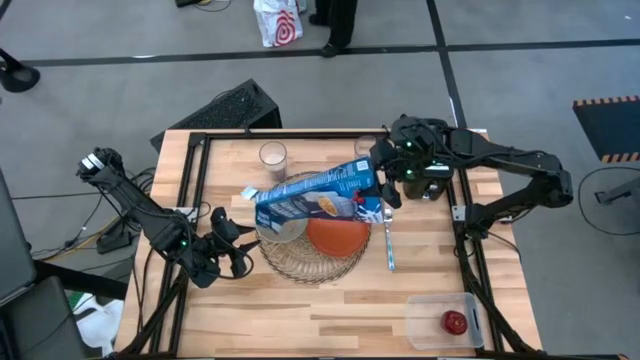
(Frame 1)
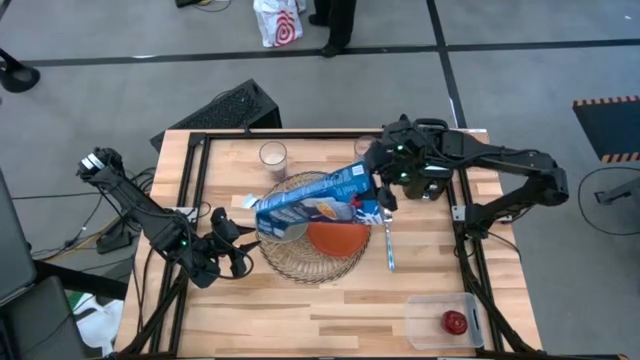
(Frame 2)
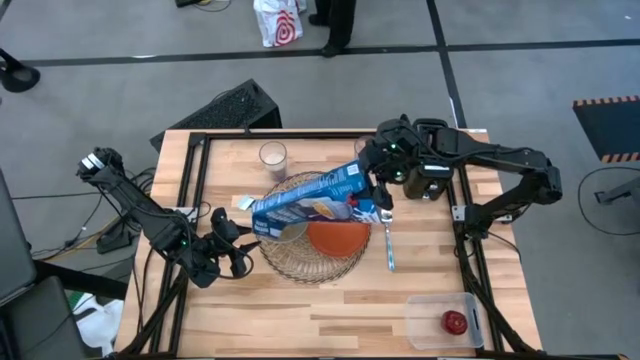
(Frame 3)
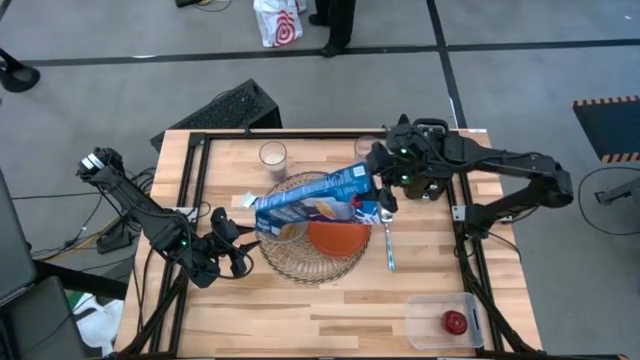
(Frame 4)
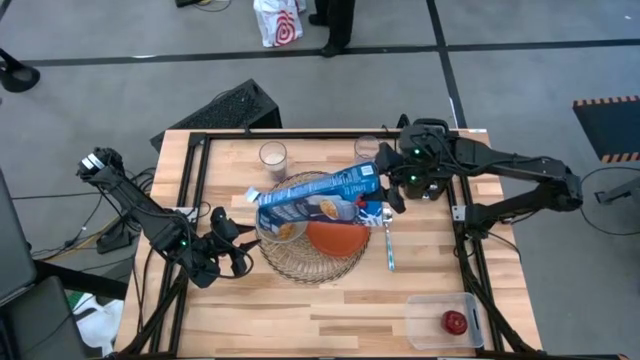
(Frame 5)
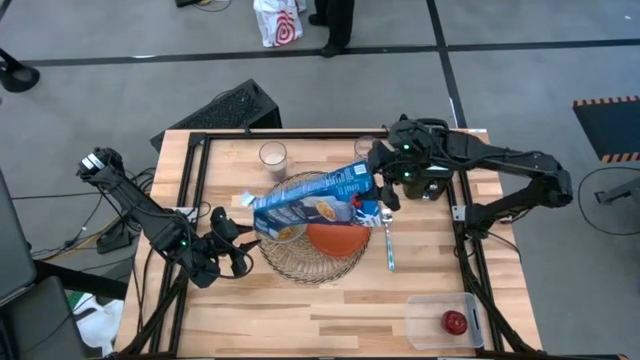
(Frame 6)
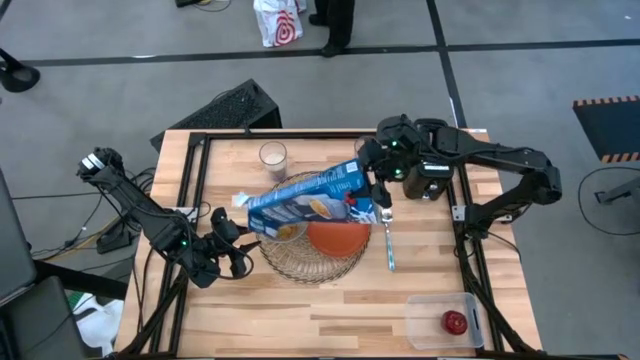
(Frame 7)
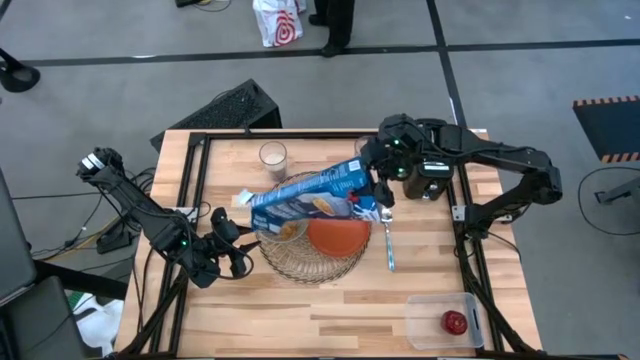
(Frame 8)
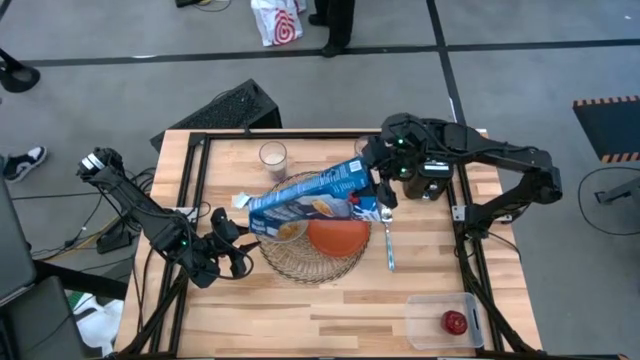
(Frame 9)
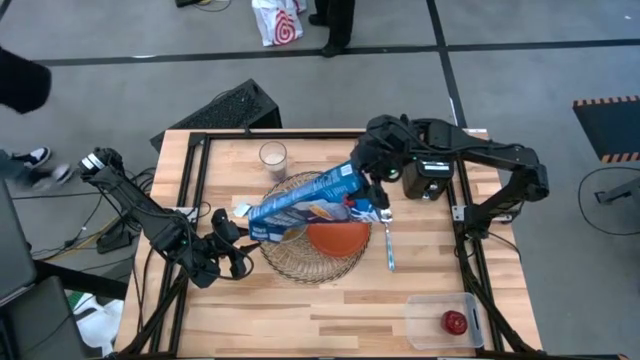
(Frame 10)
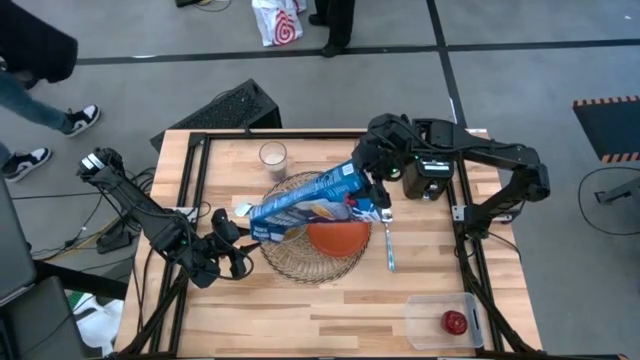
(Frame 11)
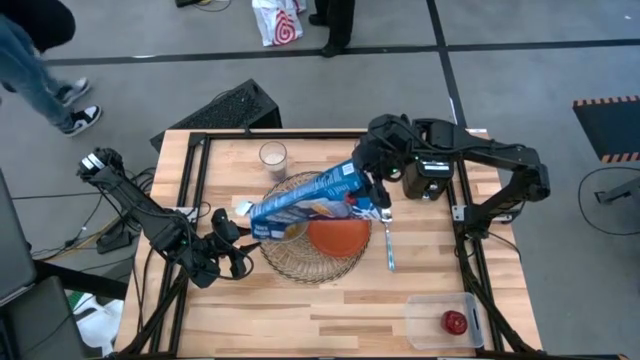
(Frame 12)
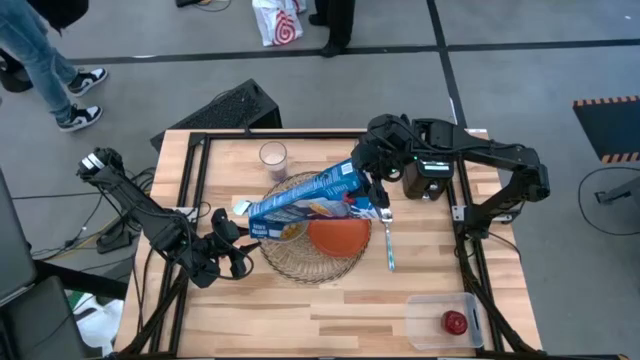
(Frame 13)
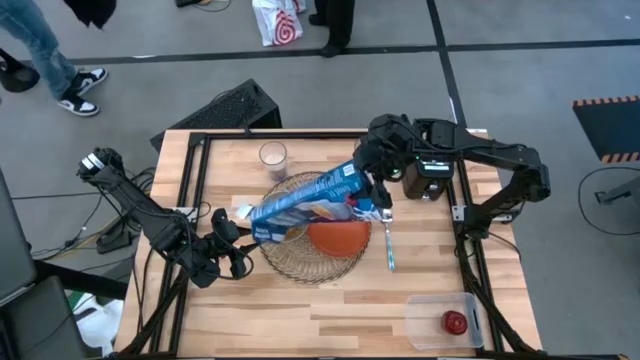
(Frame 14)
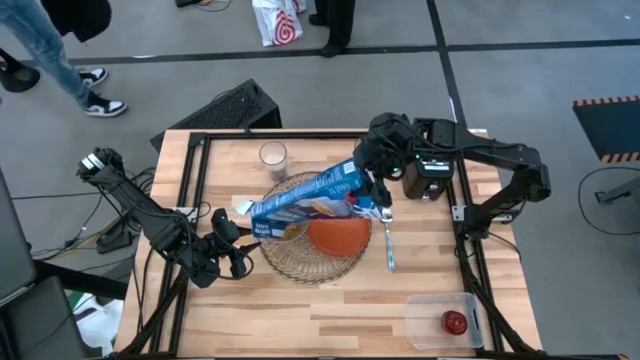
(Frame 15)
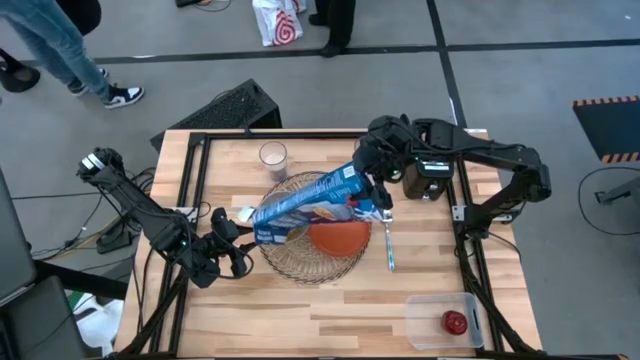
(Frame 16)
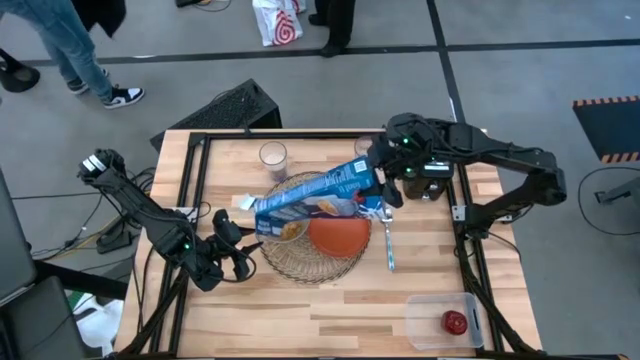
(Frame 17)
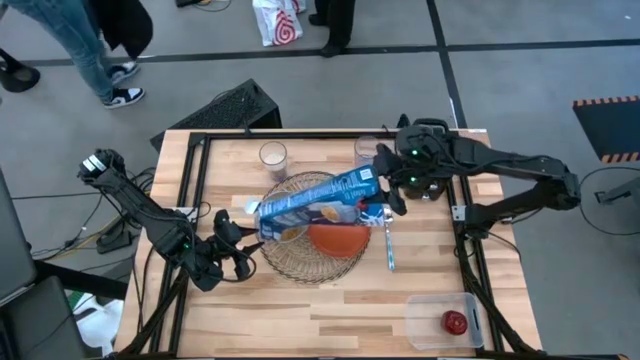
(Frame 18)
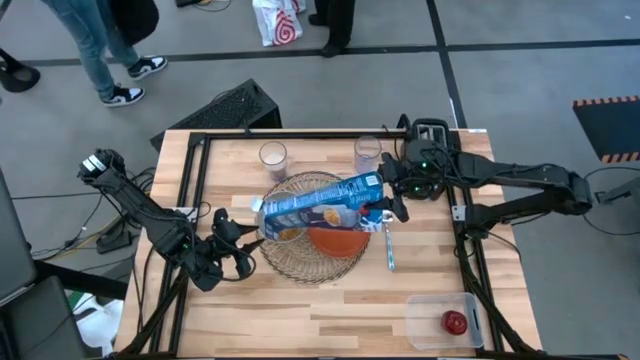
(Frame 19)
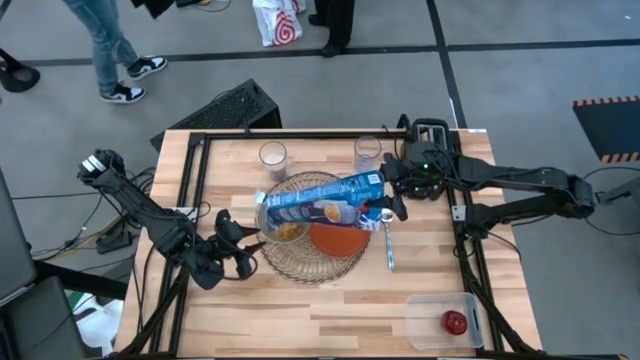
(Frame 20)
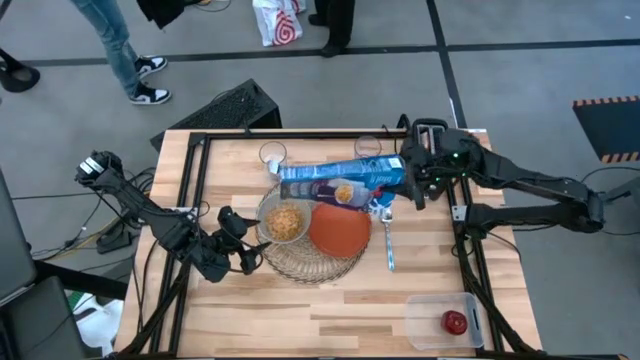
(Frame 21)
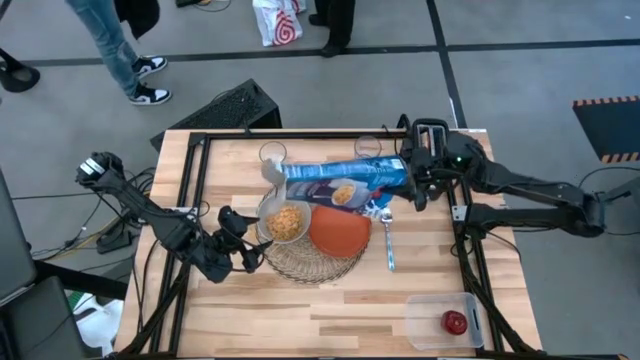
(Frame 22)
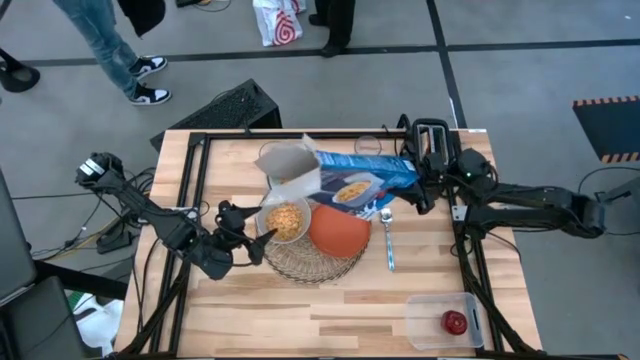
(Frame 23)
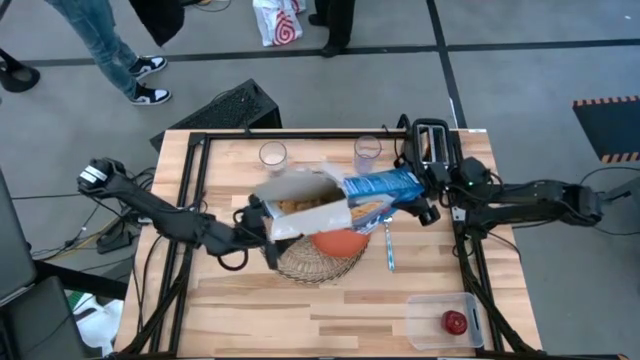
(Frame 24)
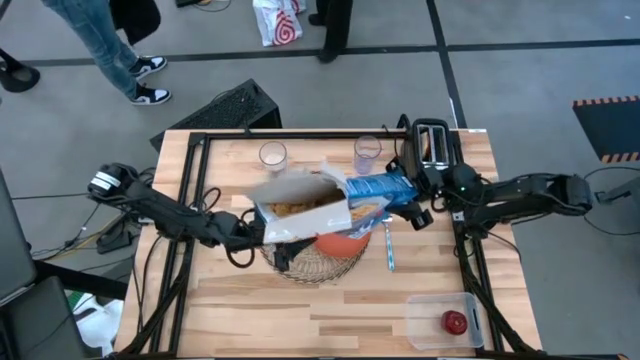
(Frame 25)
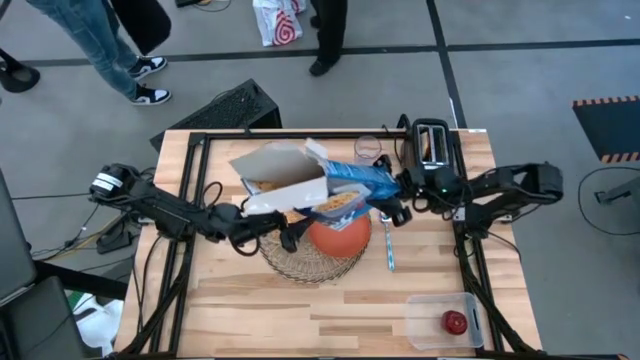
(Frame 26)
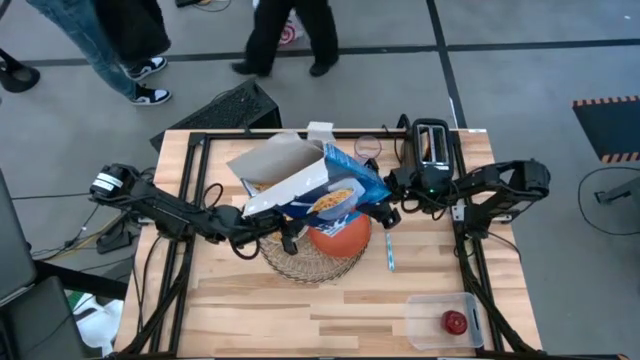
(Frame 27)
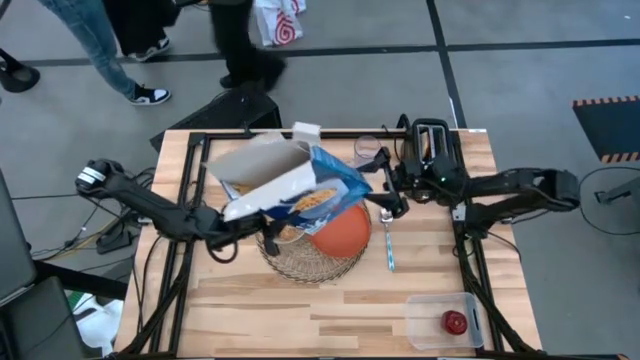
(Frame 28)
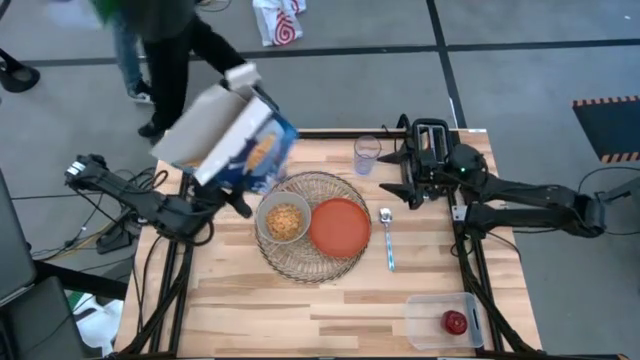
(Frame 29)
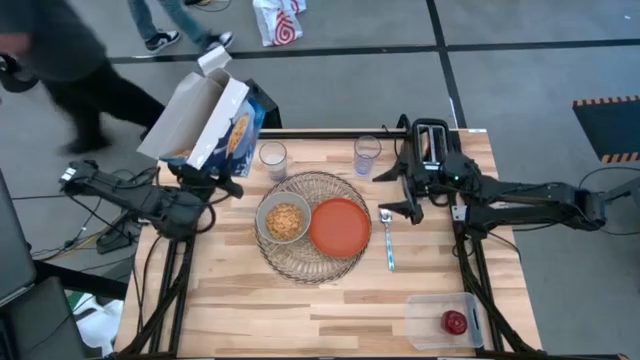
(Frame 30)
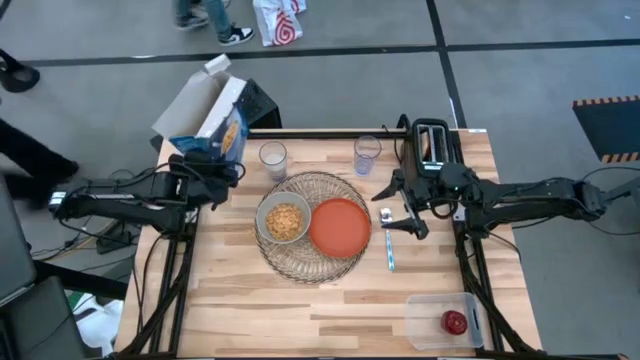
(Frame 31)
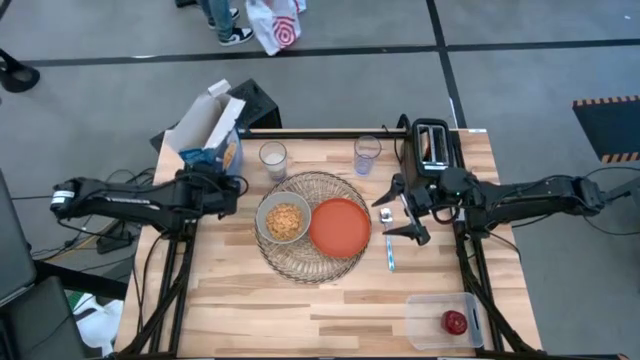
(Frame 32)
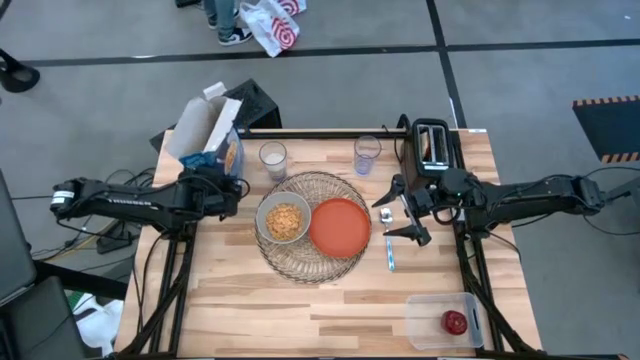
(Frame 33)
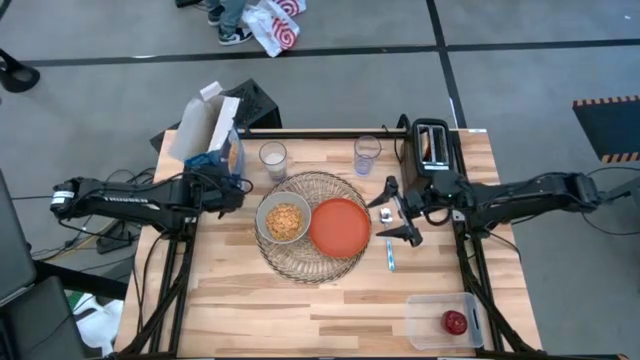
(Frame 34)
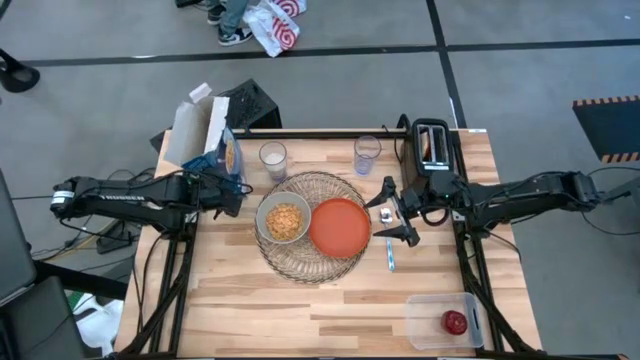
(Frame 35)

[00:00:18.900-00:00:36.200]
Task: Arrange a breakfast setting
Pour the cereal into the gray bowl
